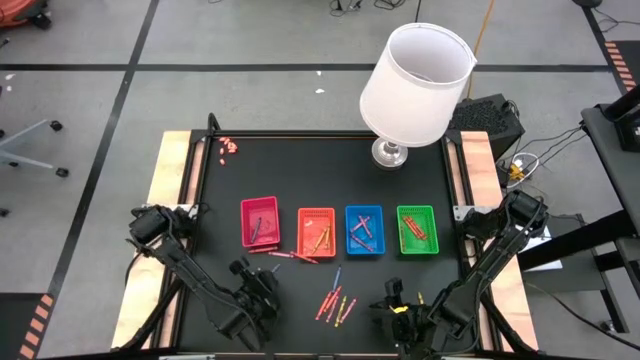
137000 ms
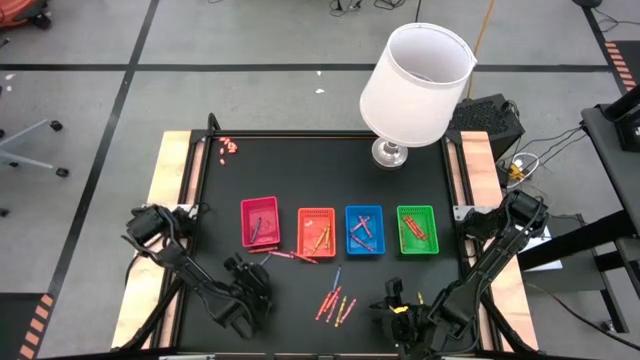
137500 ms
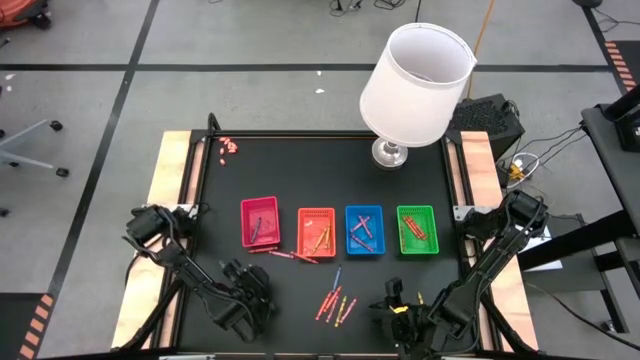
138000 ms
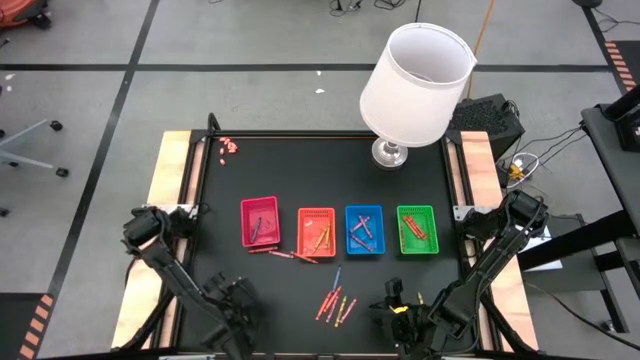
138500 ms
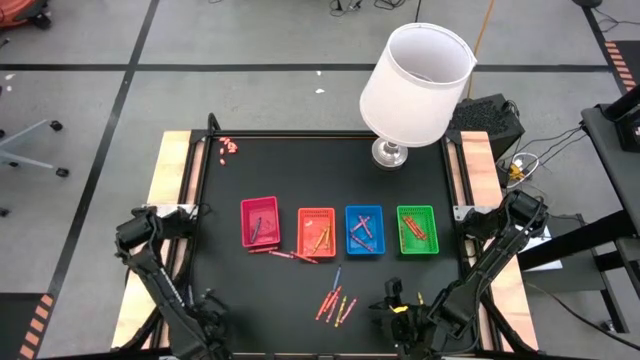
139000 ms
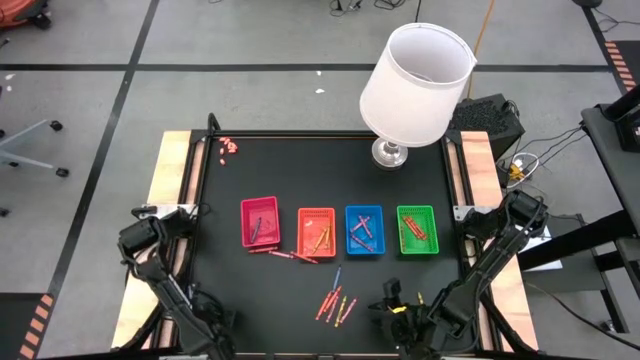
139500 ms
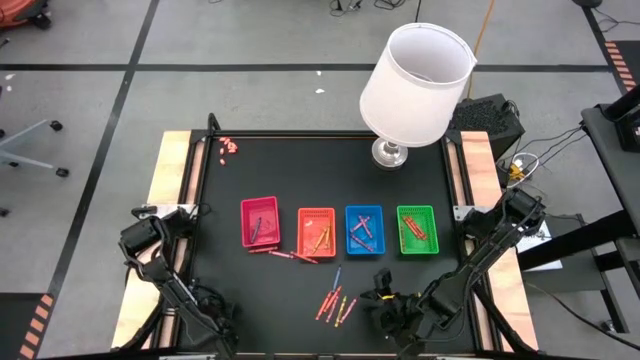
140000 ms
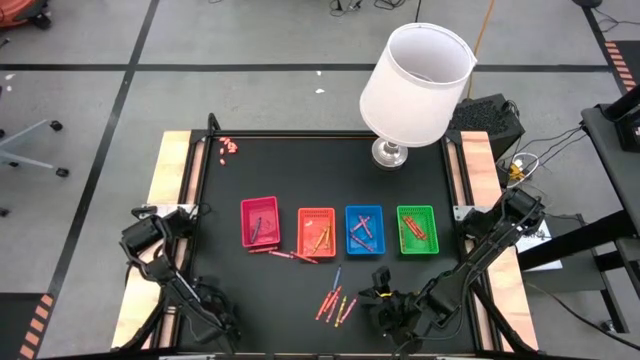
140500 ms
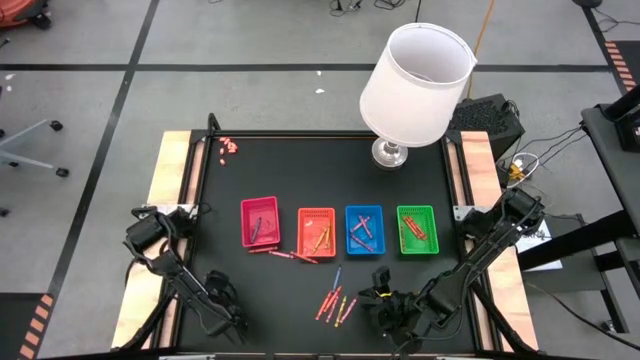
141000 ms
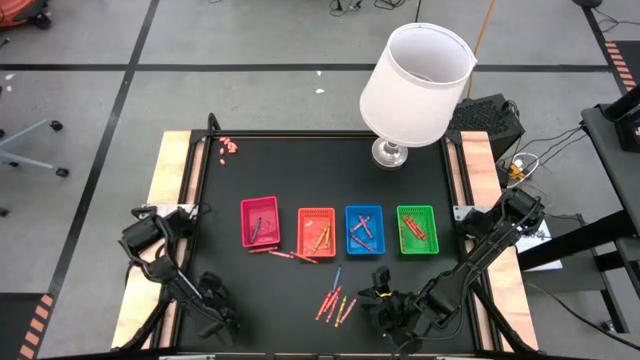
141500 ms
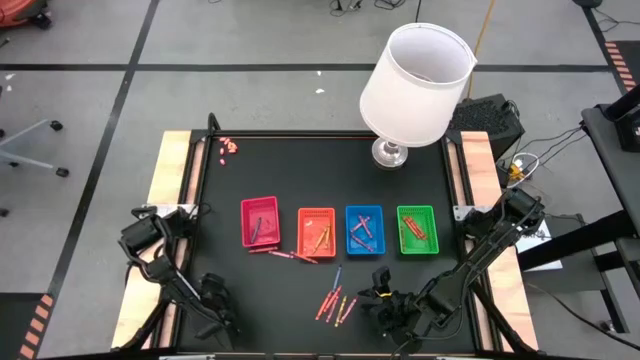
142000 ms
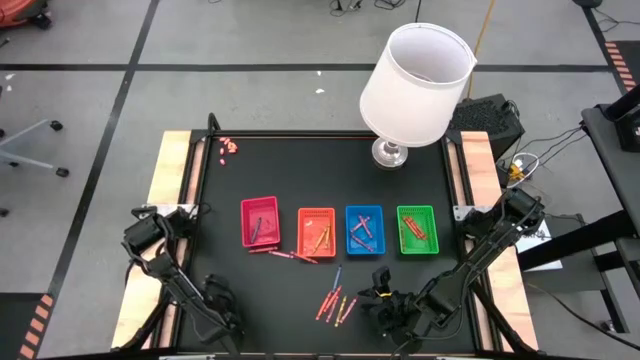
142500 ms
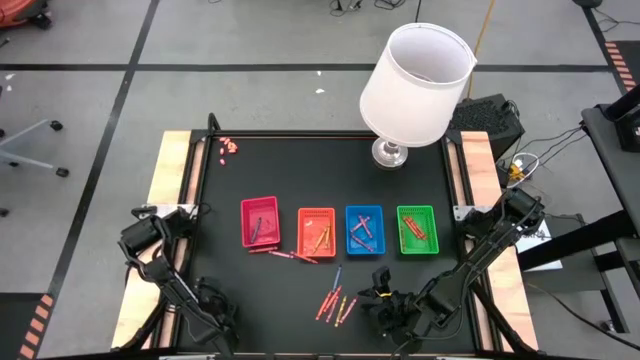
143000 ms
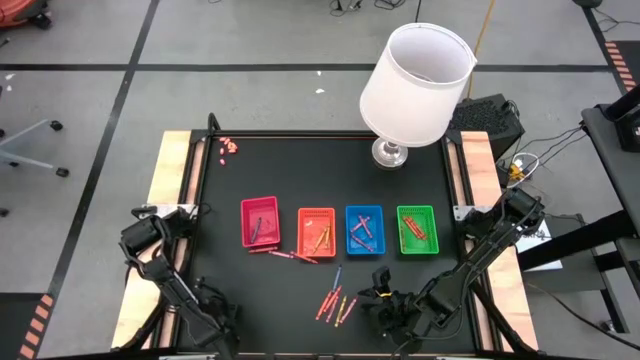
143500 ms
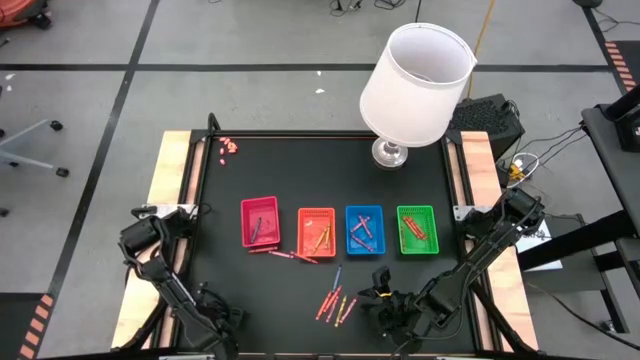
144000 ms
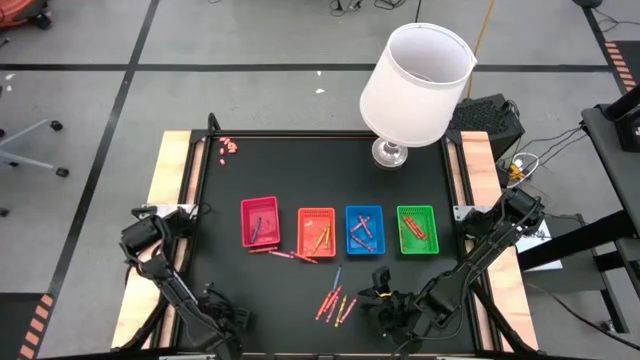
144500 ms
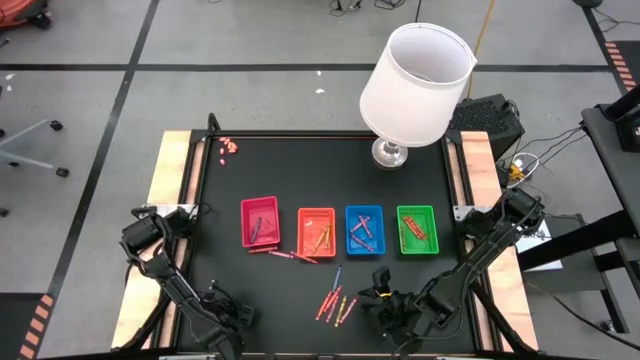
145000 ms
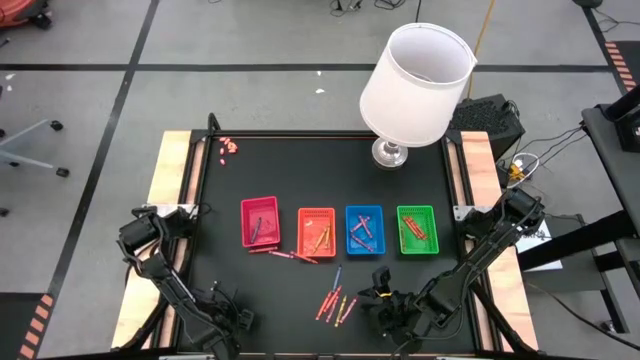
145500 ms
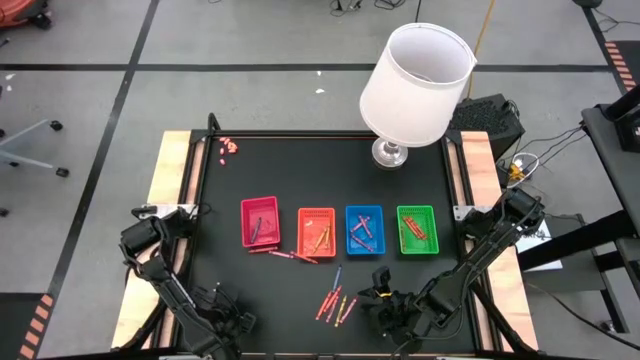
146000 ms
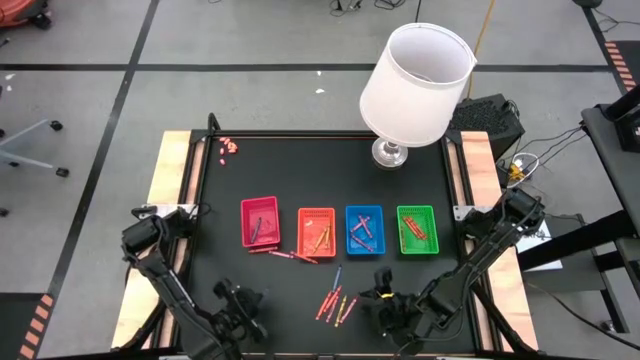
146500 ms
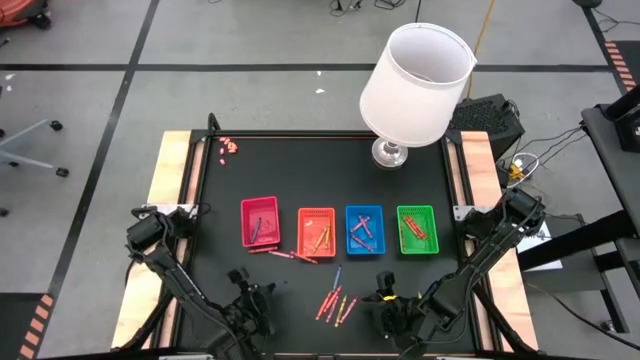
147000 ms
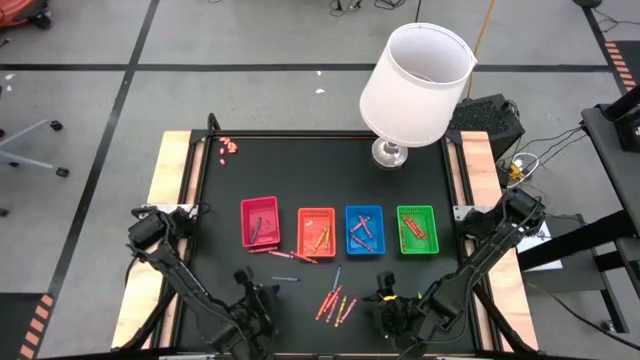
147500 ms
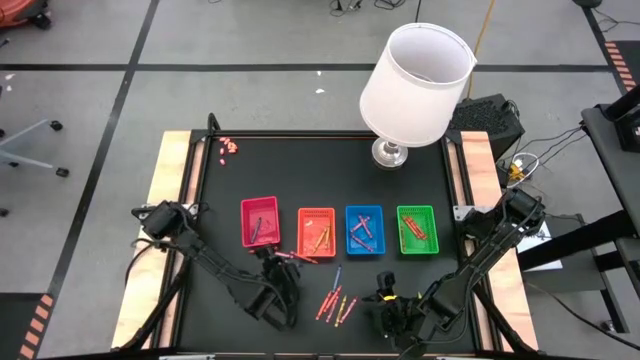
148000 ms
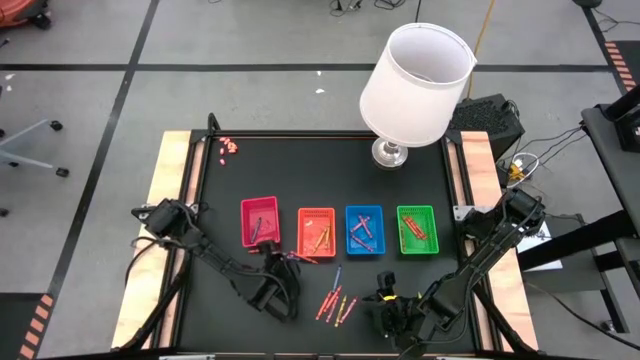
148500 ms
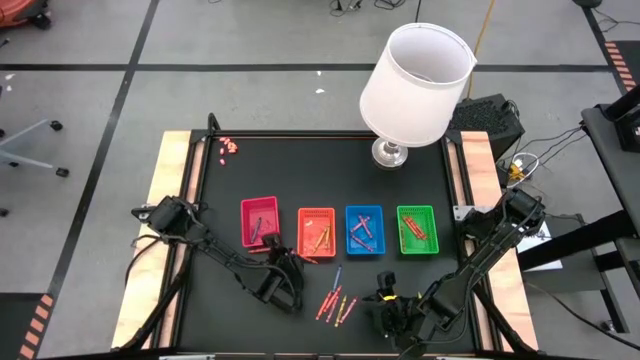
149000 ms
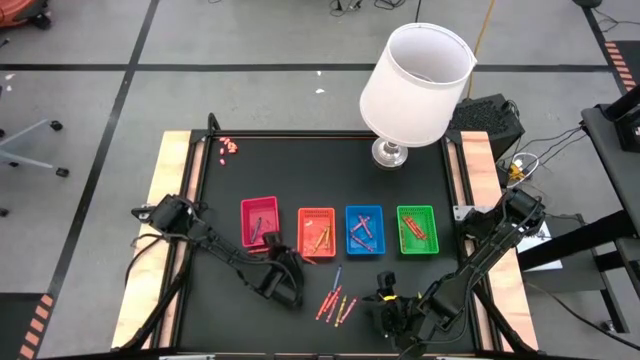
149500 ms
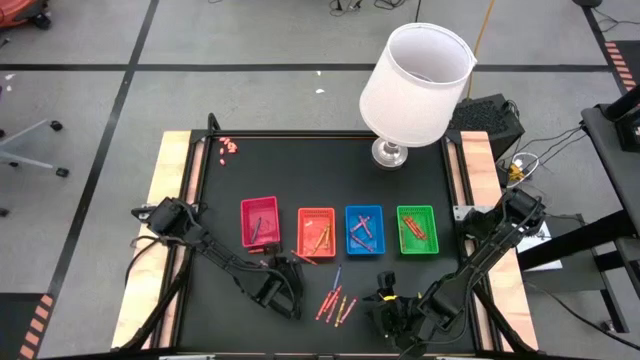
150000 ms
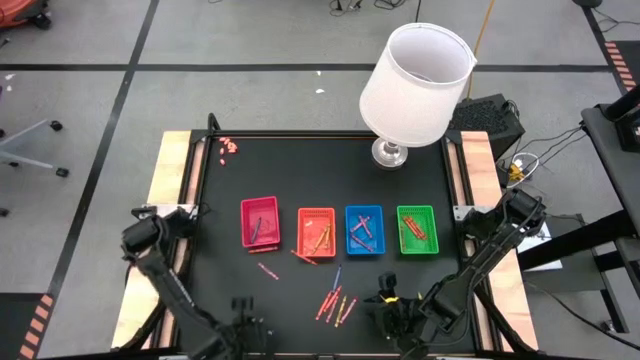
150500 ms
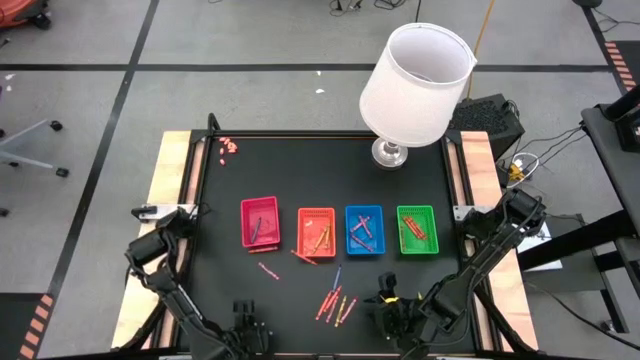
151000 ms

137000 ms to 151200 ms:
Task: Sort crayons
Put the blue crayon into the red bin

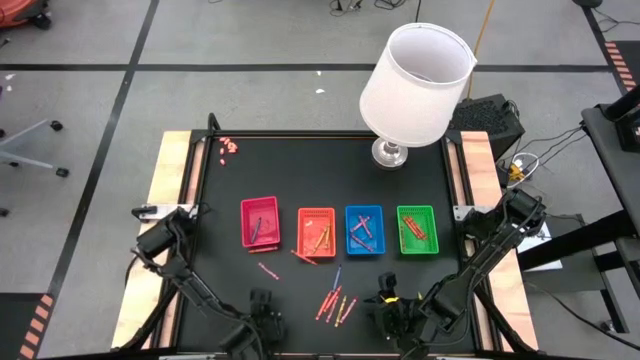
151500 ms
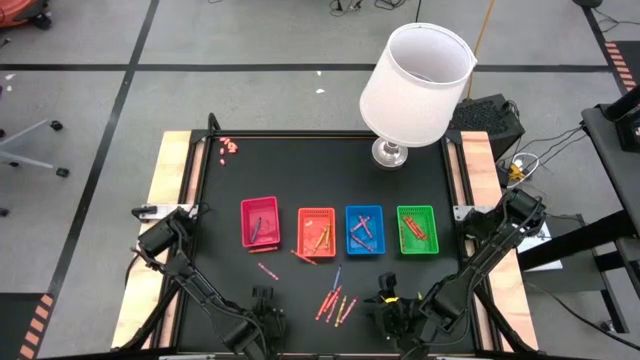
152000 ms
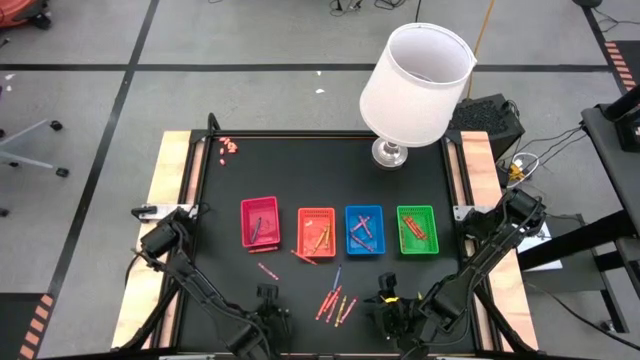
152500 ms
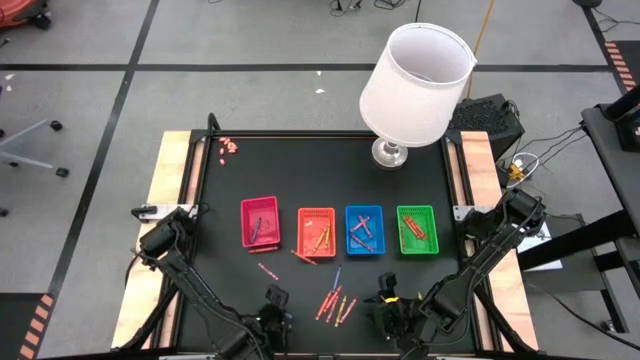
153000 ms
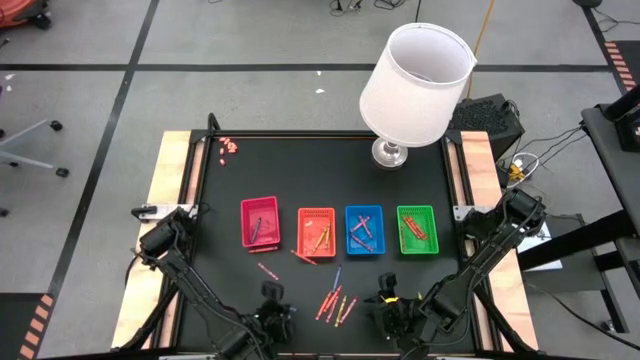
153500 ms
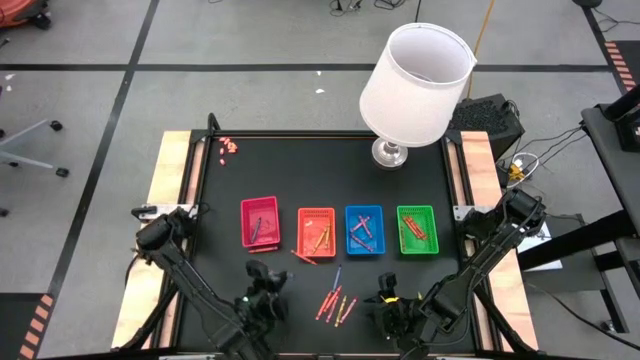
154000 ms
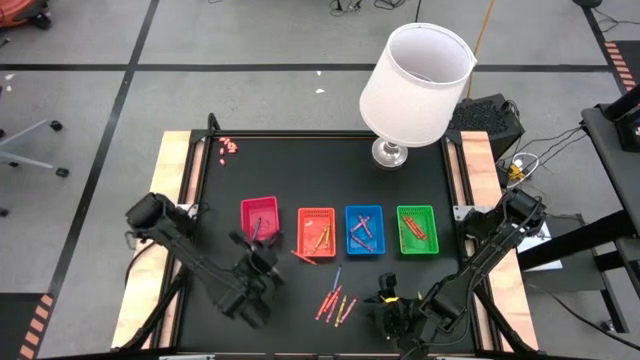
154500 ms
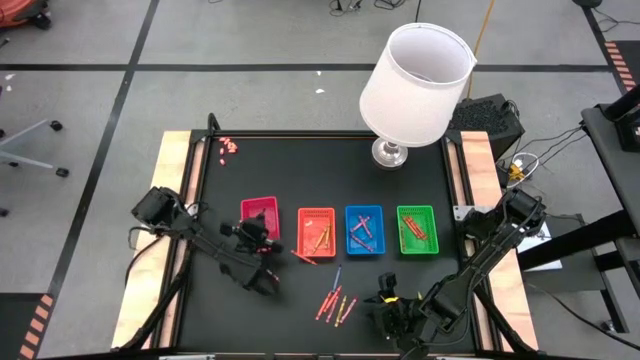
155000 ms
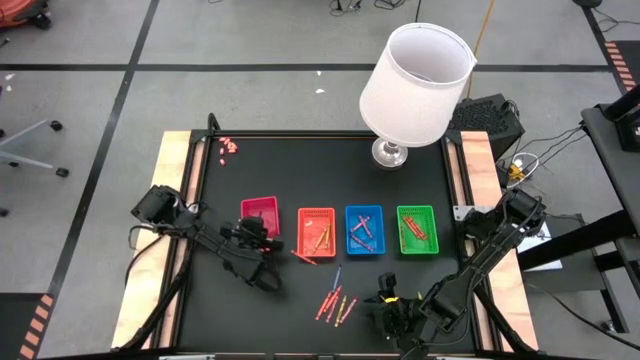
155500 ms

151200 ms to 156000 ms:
Put the blue crayon into the red bin

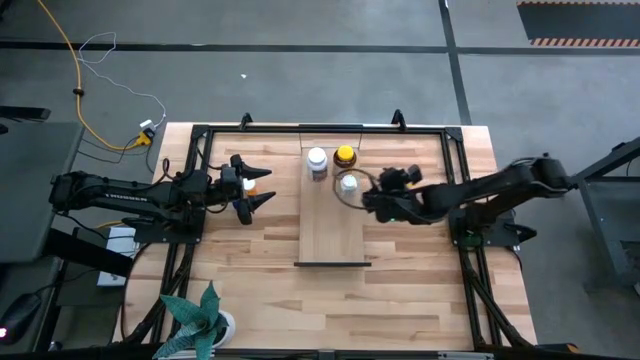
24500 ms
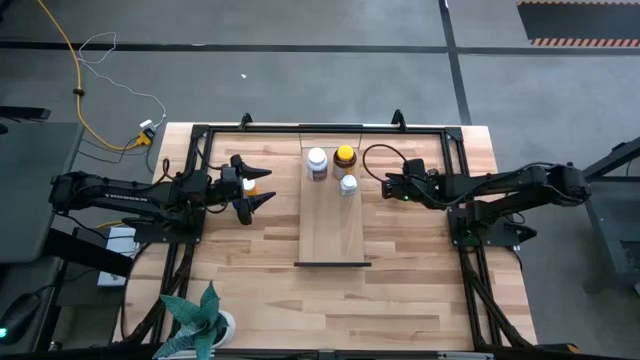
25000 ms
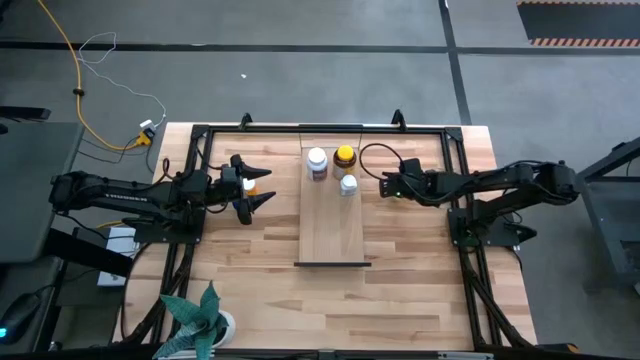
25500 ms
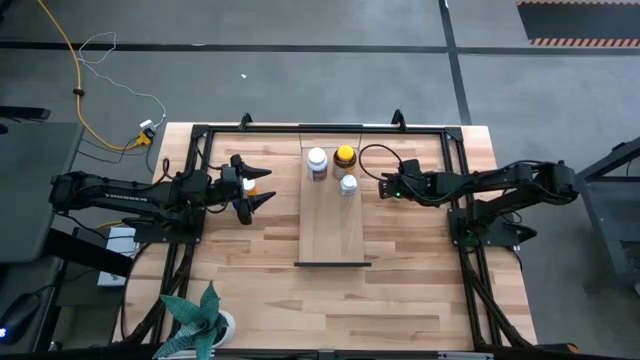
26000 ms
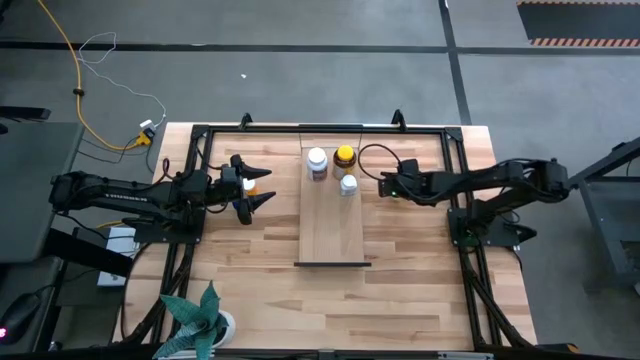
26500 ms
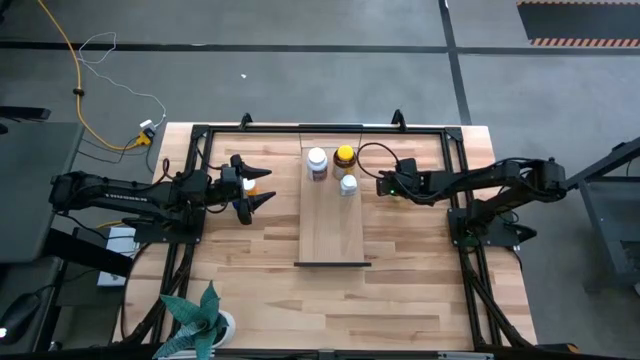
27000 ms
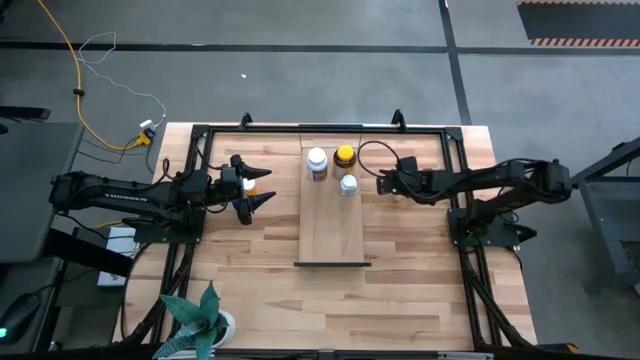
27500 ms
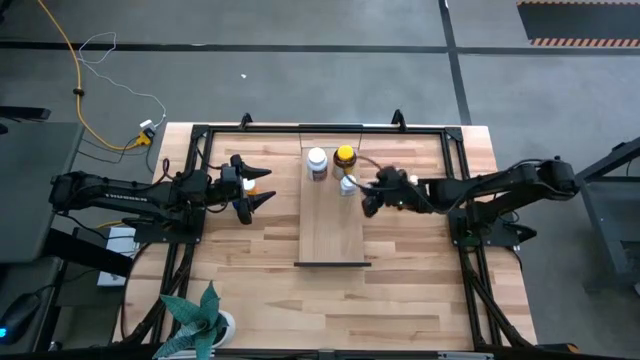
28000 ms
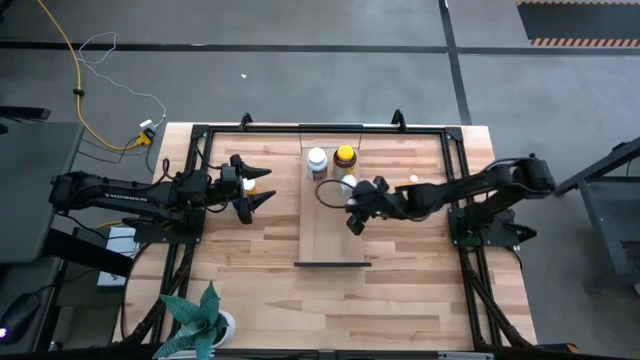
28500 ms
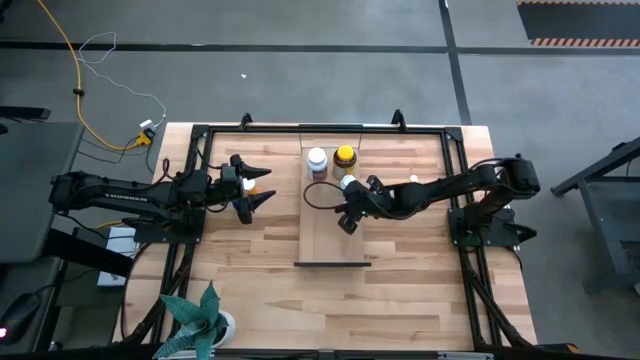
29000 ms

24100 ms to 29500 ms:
Task: Pick and place medicine bottles onto shelf by color
Put the pink pill bottle on the shelf
